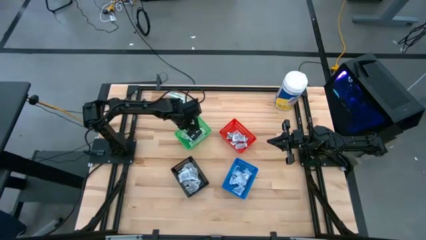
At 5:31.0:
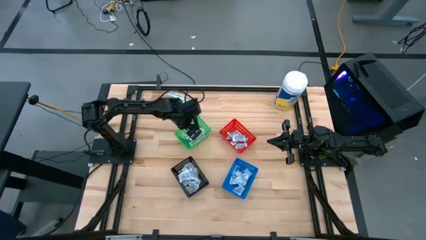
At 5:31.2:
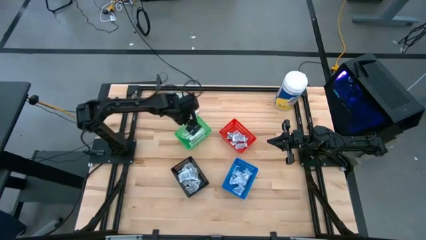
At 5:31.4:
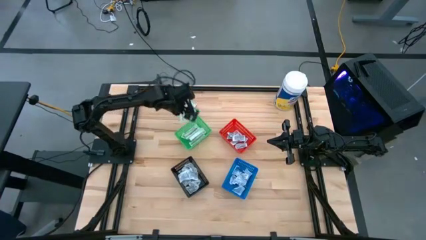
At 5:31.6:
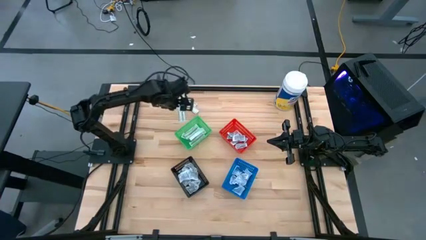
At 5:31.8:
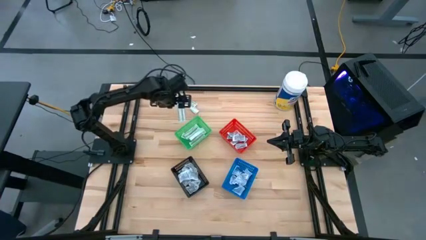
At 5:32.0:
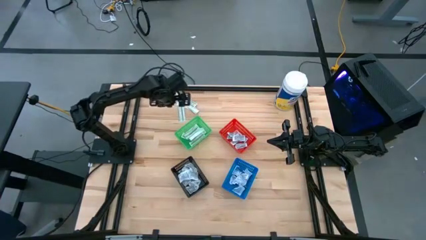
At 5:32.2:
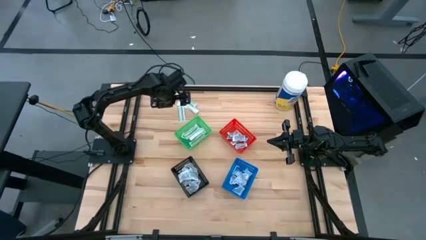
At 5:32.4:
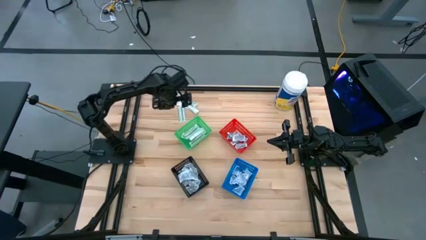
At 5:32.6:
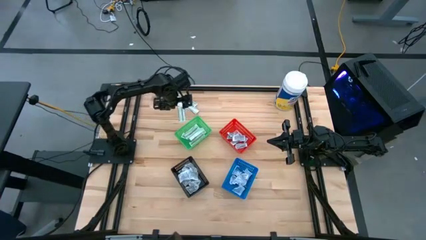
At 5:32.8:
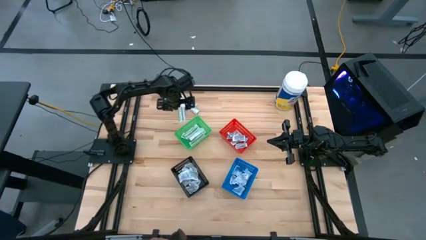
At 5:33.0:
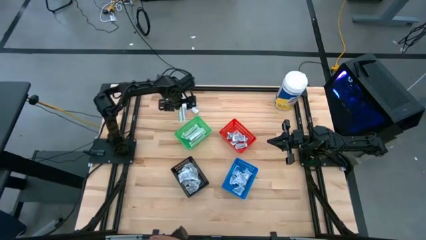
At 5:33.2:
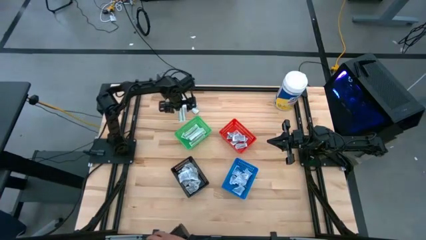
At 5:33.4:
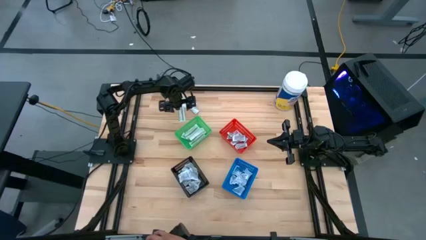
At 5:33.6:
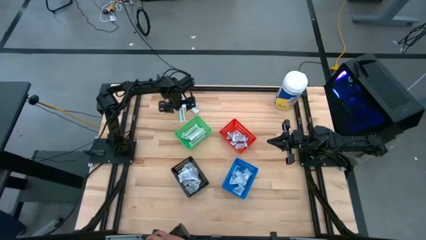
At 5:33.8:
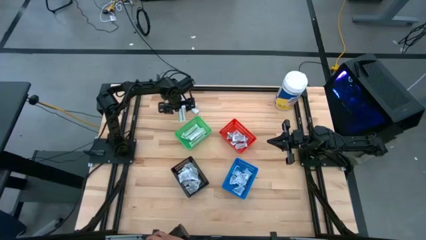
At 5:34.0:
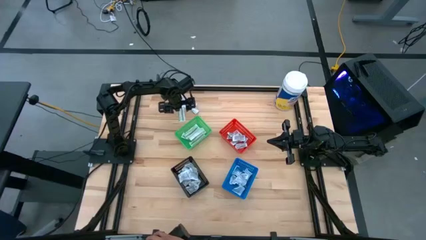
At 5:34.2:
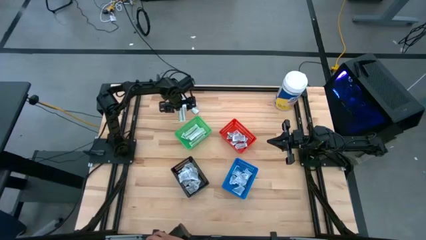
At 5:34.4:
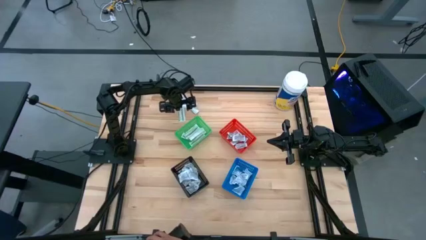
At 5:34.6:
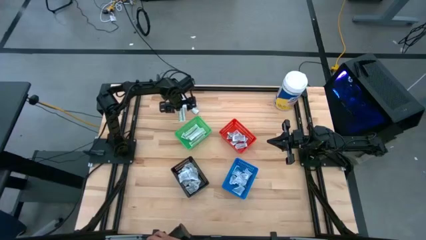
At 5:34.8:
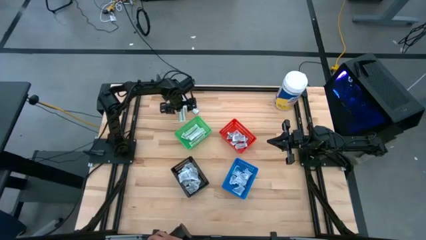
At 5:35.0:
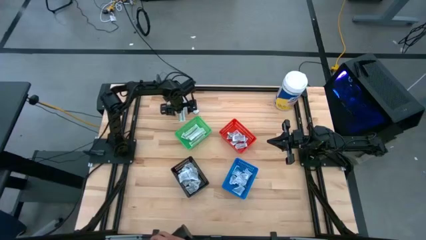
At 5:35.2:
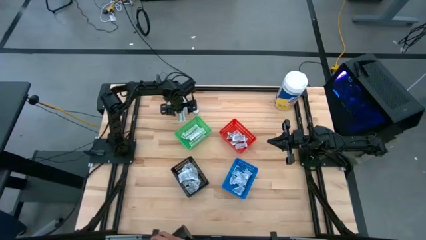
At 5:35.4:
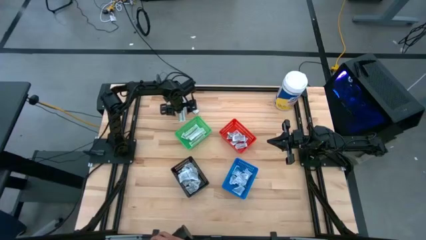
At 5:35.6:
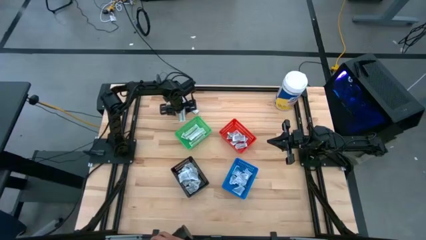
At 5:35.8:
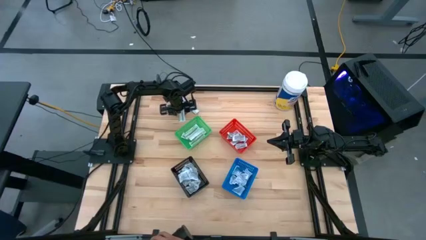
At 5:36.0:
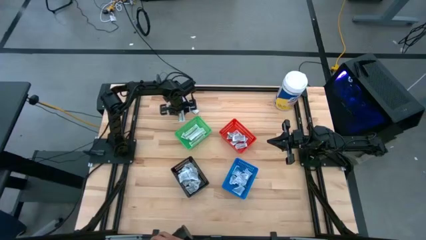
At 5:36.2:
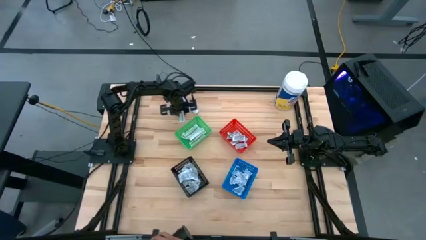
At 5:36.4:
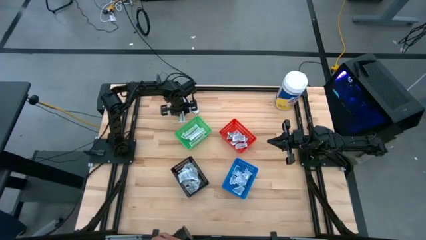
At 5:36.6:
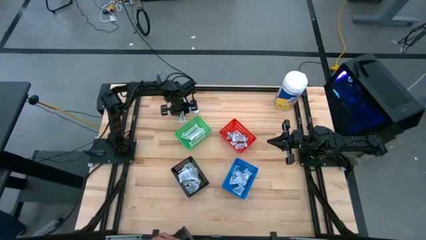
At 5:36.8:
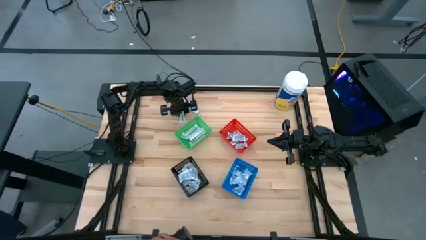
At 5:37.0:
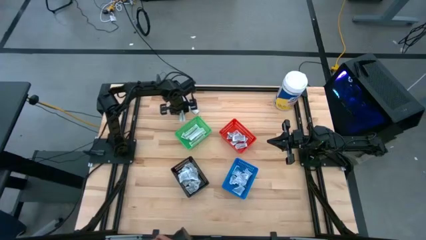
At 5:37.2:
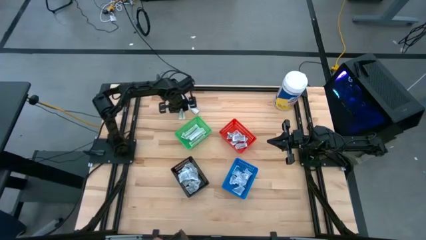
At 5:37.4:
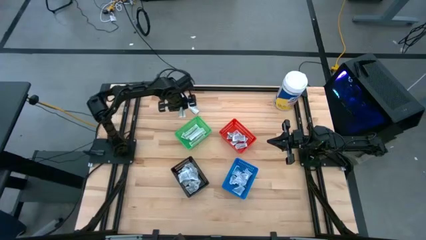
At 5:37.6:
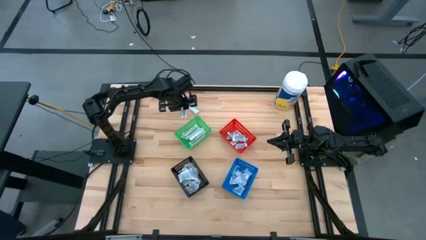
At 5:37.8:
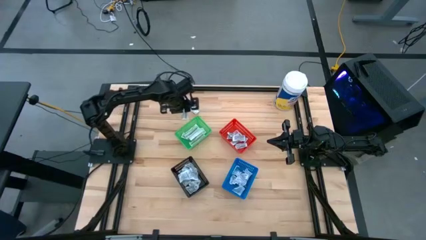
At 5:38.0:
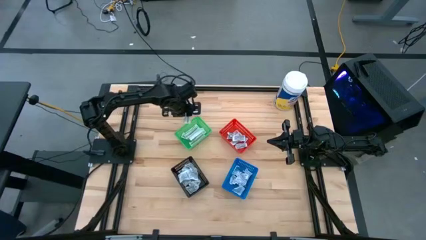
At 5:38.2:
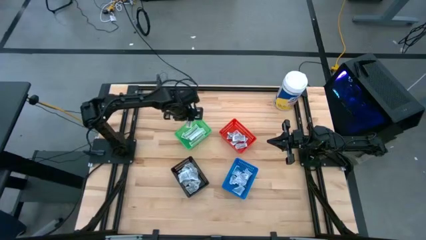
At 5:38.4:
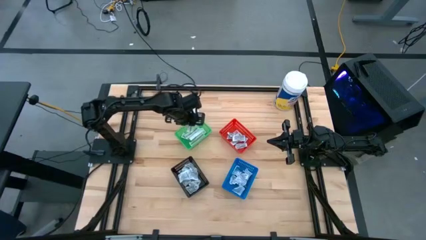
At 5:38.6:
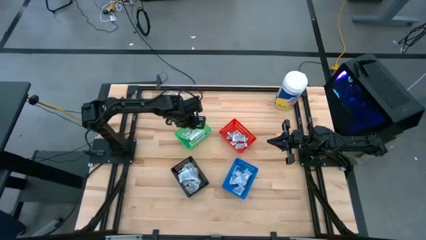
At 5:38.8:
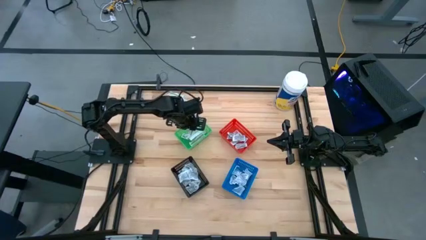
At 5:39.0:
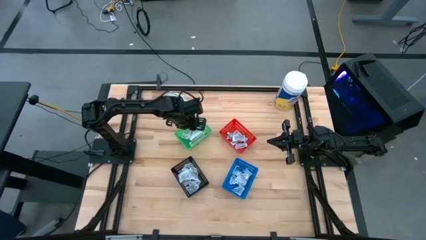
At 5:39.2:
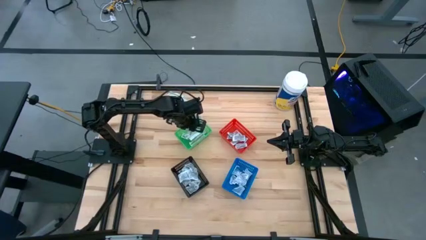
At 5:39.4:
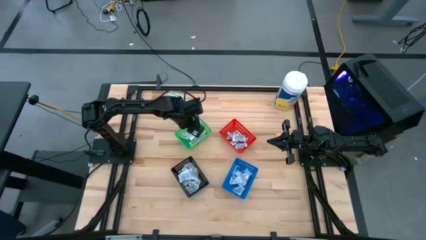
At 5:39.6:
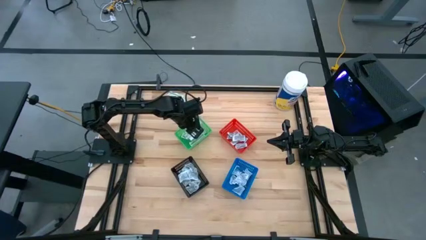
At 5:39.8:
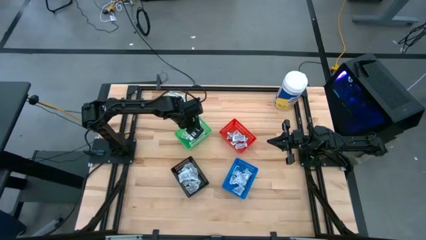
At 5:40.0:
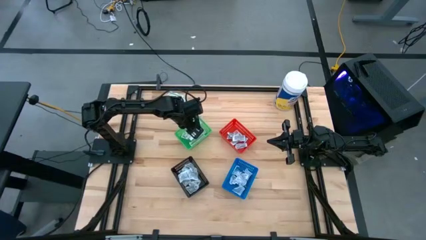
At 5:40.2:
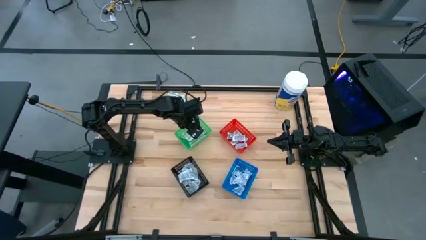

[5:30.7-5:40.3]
Task: Pick & Place First Aid Supplies
Put the green bandage pack into the green bin
